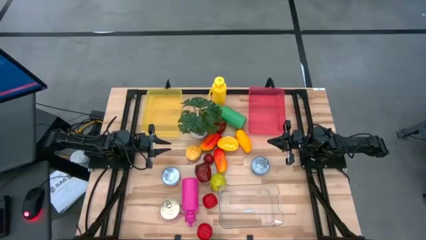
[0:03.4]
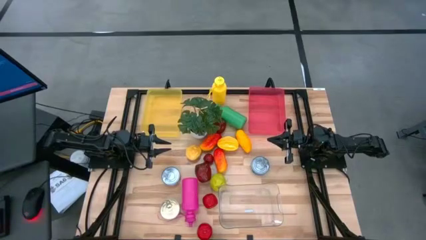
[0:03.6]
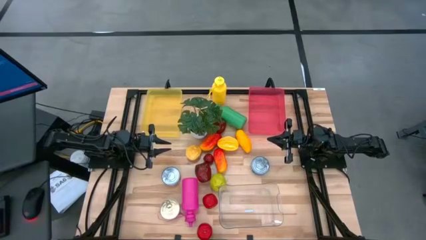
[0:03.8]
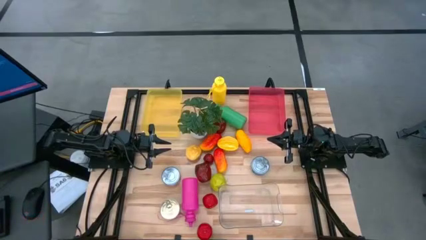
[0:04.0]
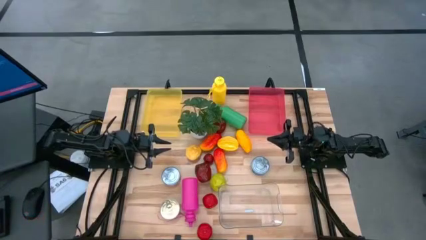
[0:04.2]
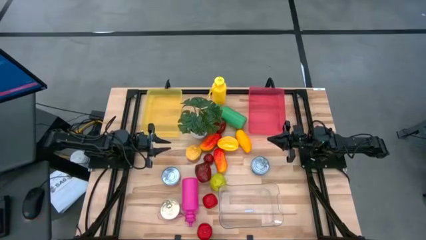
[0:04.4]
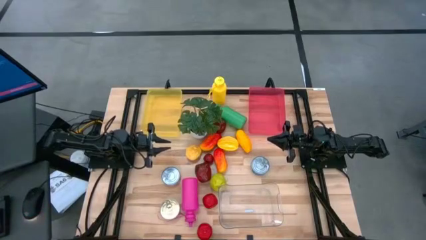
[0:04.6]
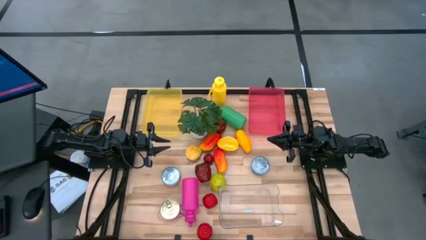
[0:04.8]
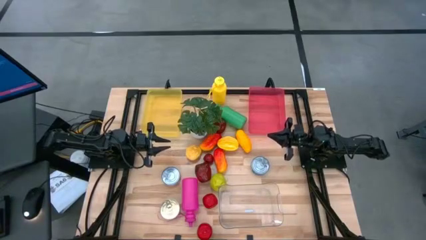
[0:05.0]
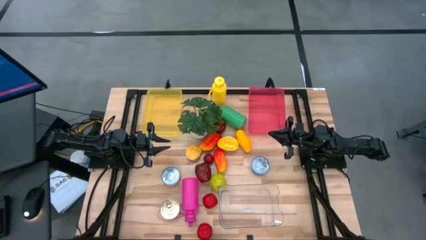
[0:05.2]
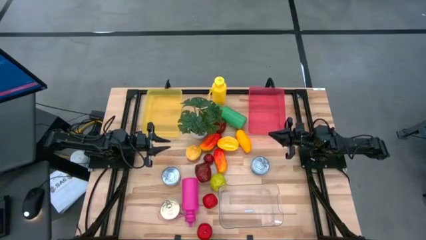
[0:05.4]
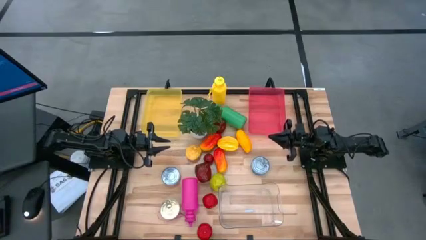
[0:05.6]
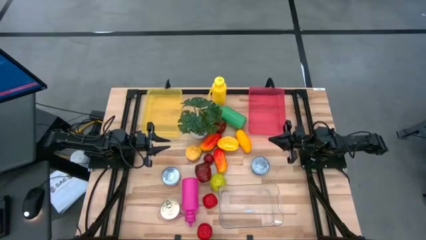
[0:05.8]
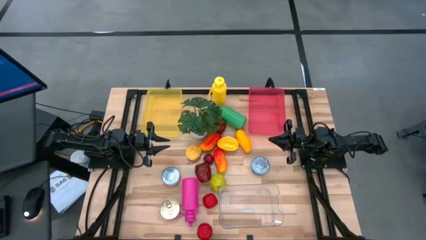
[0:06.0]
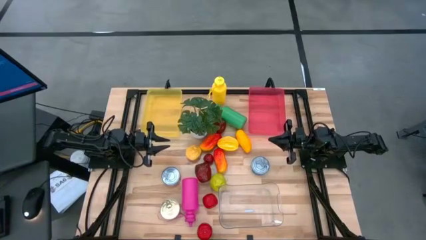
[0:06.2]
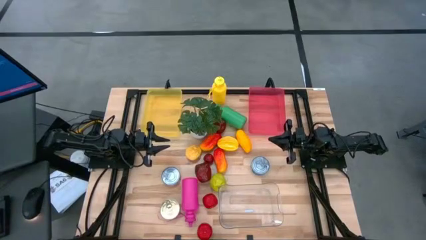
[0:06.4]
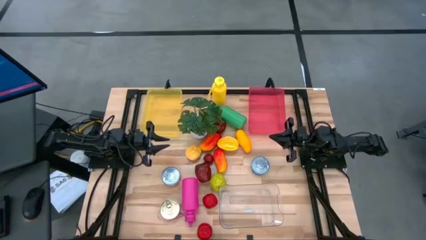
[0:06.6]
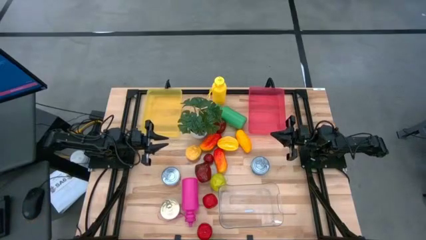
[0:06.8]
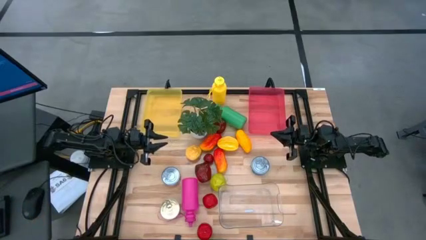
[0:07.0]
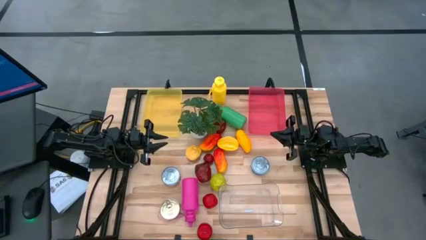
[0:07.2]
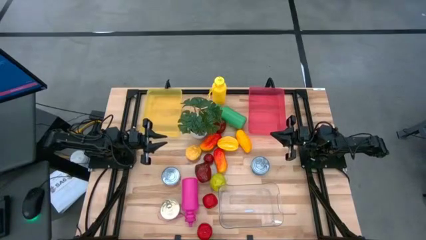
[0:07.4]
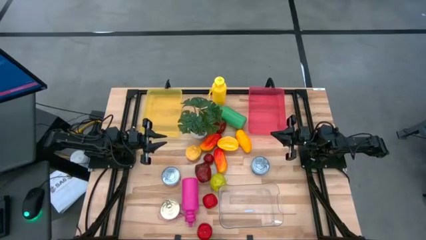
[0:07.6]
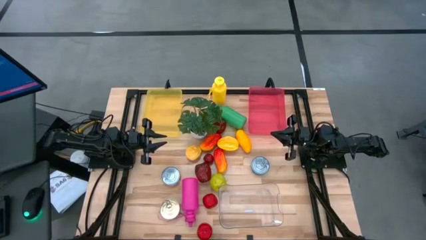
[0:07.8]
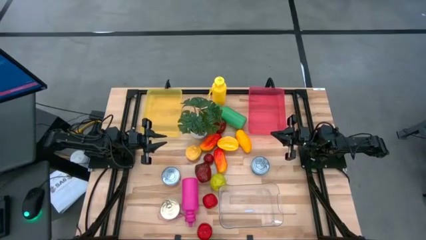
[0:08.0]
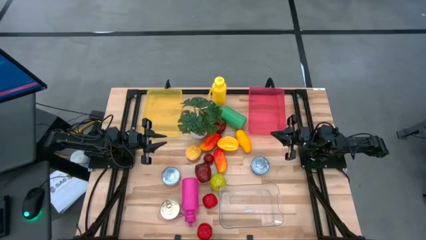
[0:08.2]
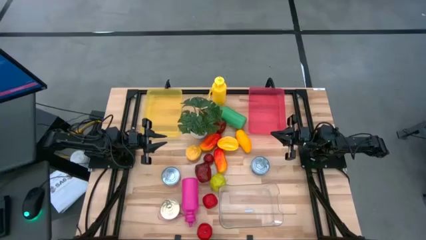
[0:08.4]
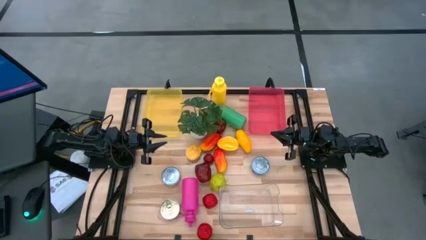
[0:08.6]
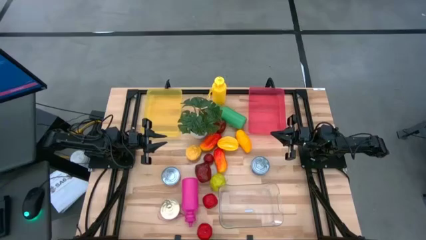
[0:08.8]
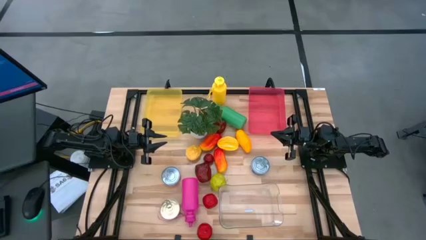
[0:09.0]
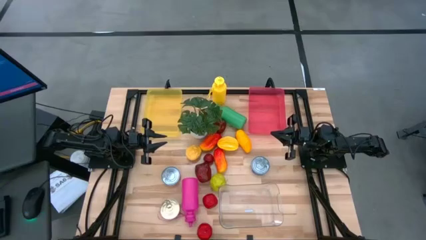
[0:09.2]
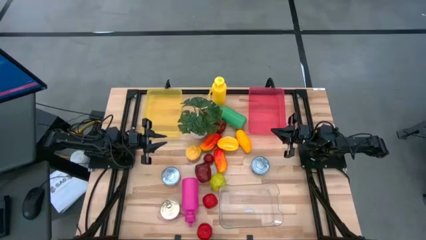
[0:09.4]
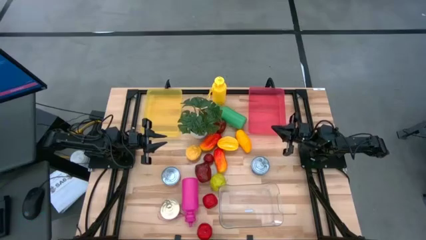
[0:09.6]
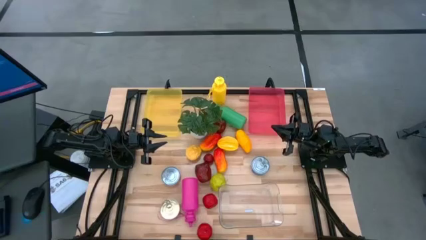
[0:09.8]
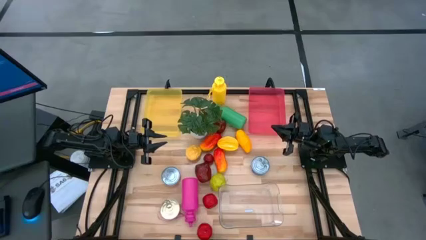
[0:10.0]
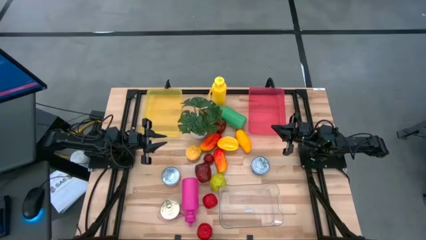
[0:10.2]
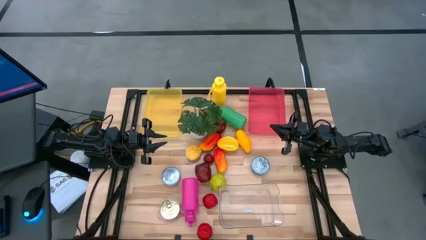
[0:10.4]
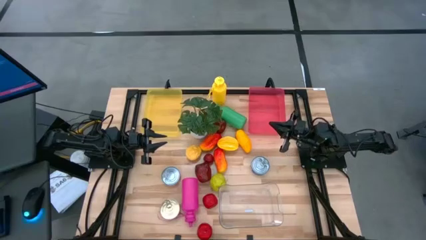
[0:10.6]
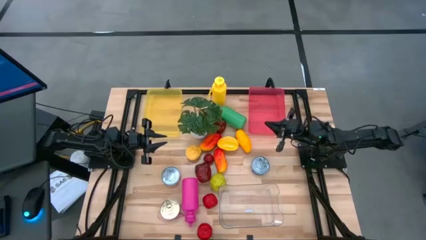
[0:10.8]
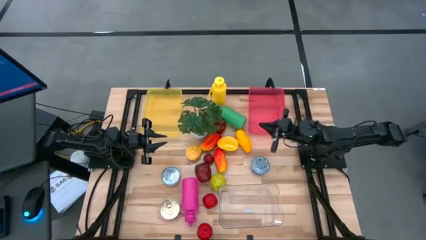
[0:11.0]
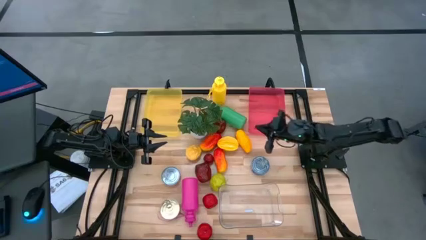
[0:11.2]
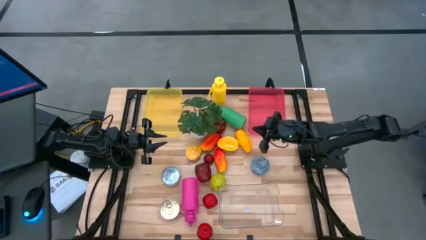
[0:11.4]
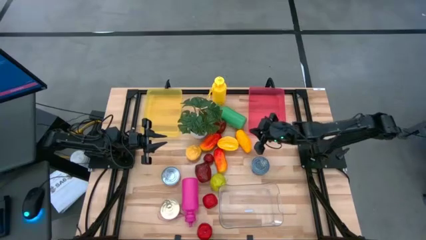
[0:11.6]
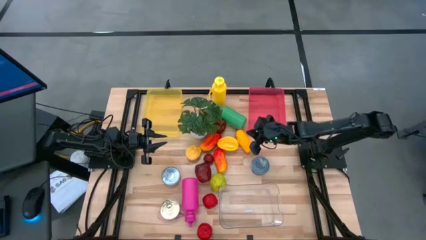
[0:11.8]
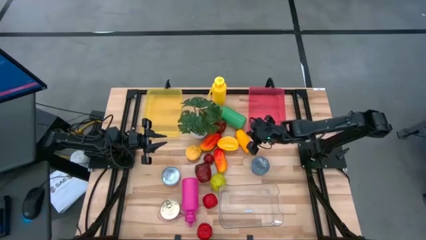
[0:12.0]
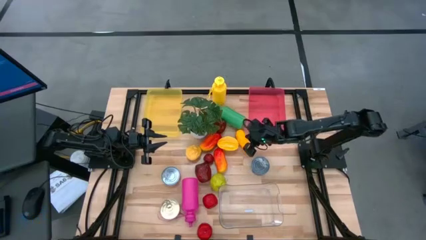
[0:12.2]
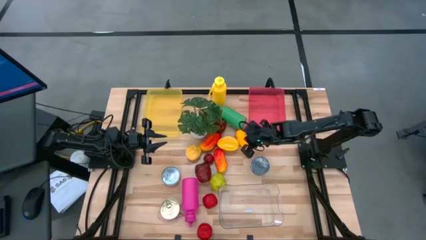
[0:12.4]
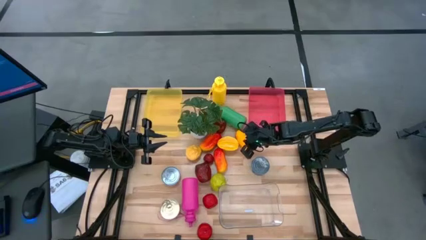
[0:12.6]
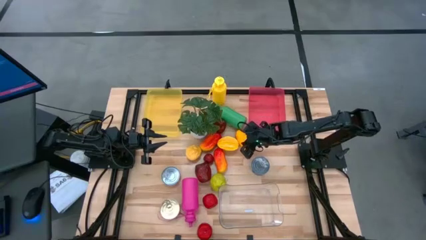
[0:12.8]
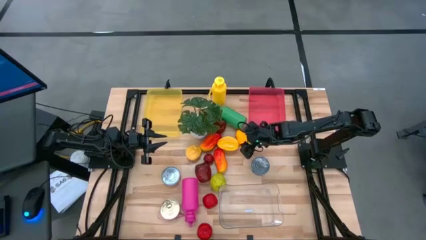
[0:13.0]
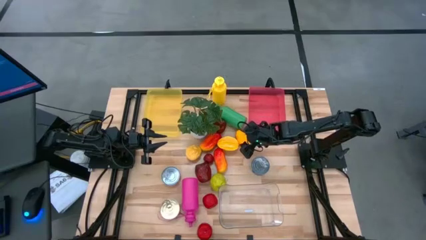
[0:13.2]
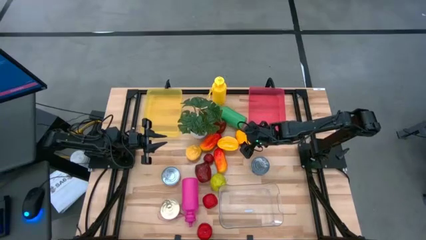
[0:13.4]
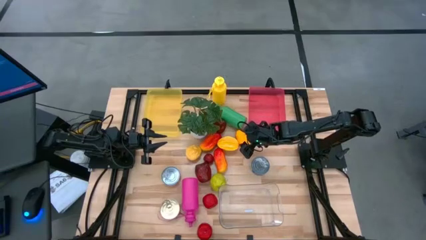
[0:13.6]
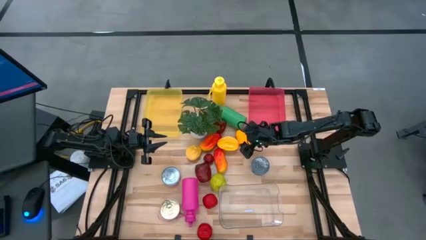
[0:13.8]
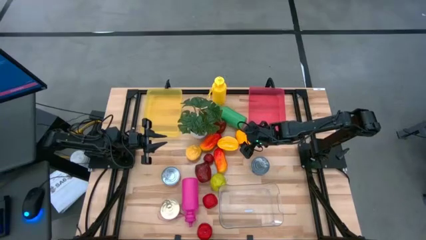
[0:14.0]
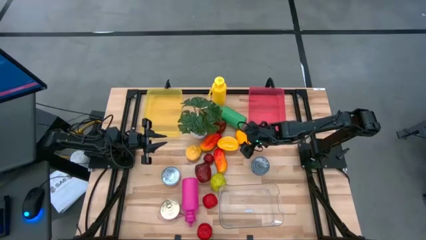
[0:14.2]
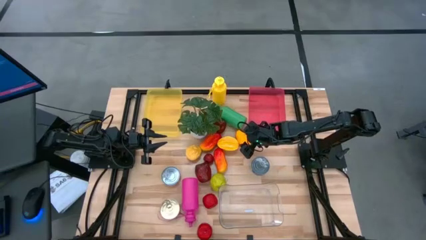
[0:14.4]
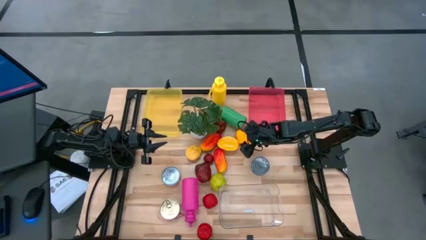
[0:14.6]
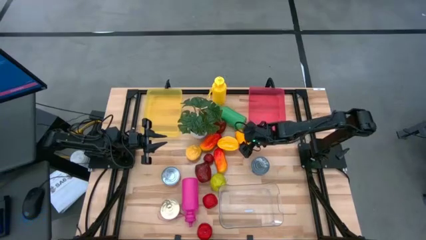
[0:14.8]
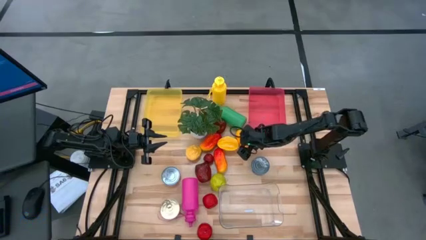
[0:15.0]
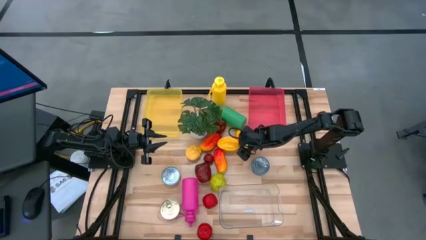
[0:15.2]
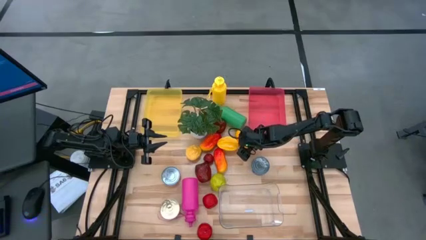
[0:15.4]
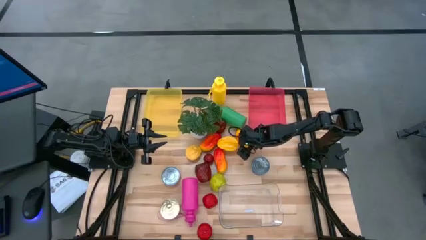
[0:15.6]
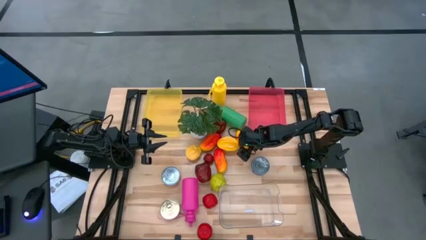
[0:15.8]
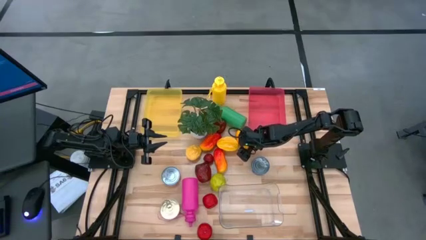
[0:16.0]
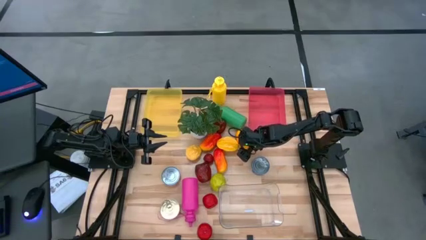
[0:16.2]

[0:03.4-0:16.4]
Task: Pick & Place Food Item
Put the yellow mango into the yellow bin
